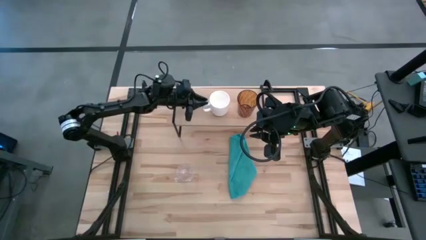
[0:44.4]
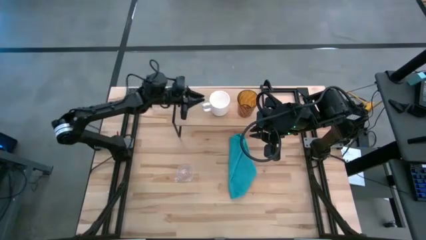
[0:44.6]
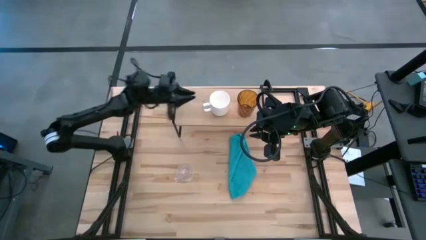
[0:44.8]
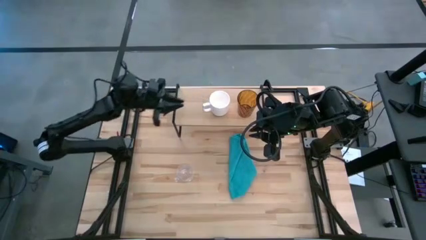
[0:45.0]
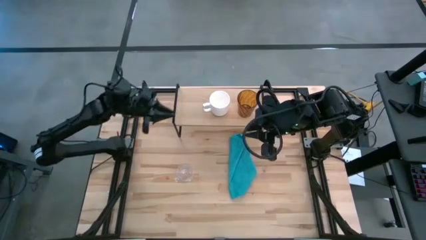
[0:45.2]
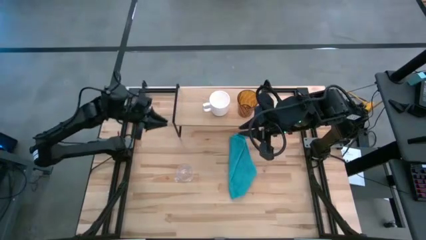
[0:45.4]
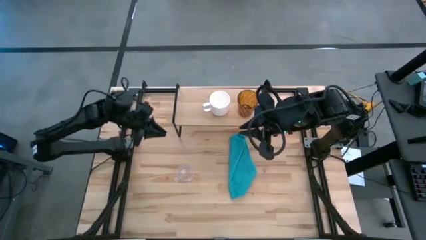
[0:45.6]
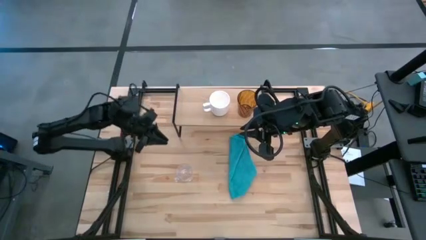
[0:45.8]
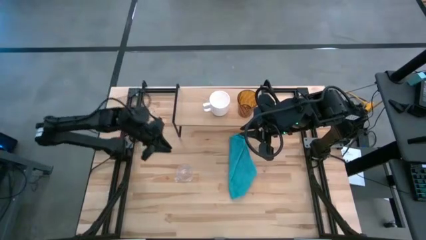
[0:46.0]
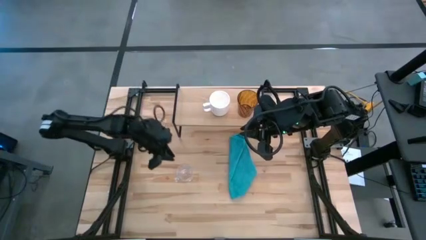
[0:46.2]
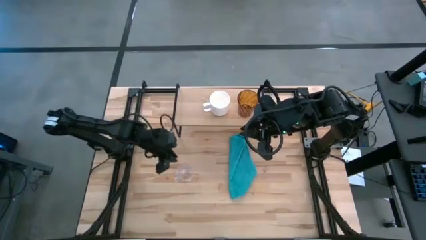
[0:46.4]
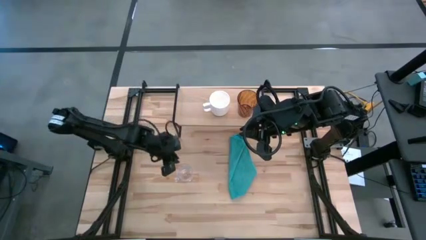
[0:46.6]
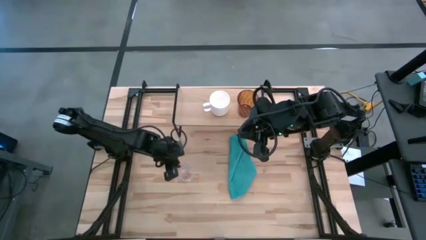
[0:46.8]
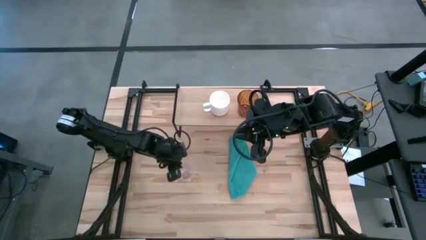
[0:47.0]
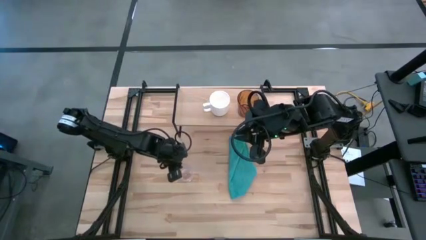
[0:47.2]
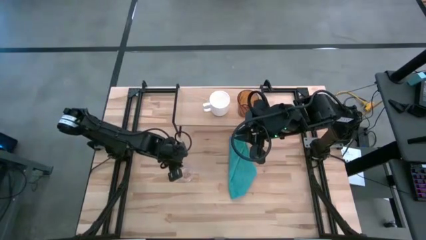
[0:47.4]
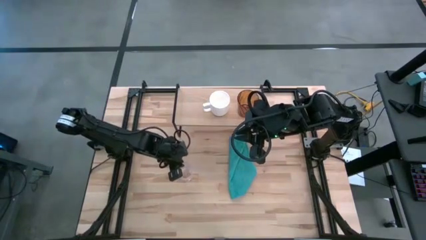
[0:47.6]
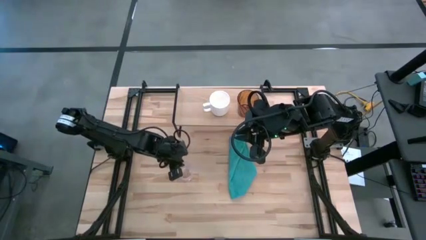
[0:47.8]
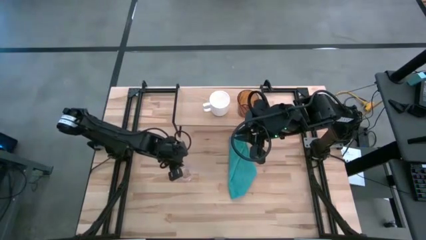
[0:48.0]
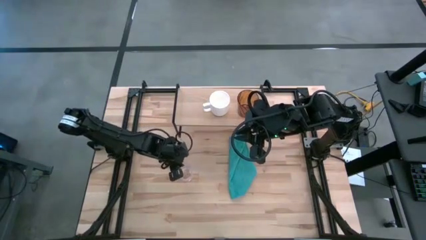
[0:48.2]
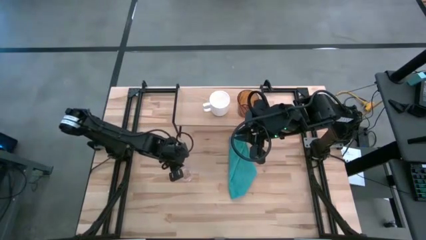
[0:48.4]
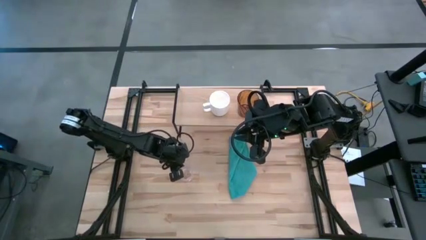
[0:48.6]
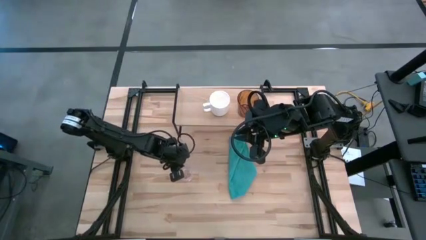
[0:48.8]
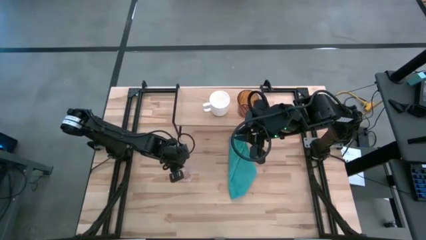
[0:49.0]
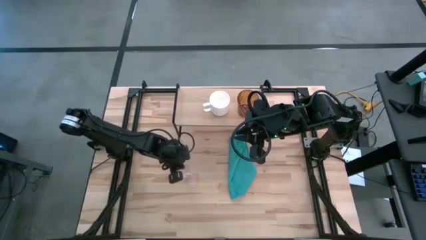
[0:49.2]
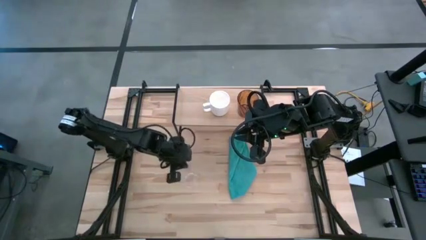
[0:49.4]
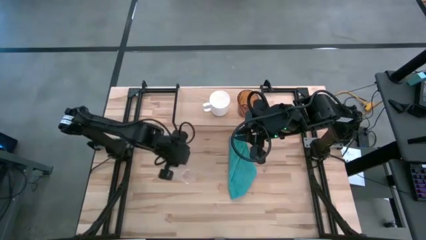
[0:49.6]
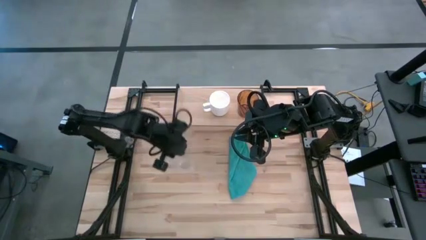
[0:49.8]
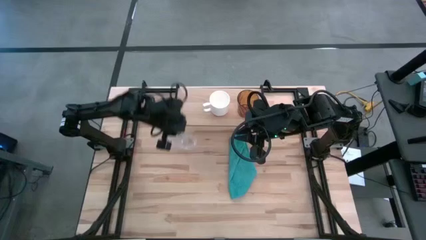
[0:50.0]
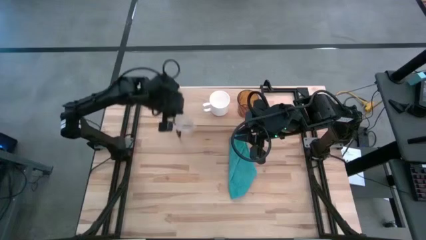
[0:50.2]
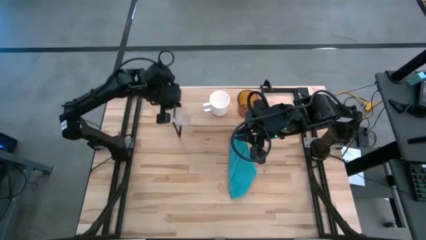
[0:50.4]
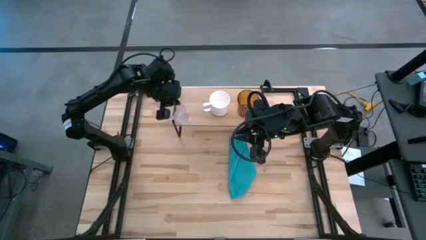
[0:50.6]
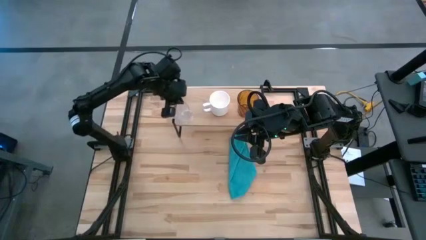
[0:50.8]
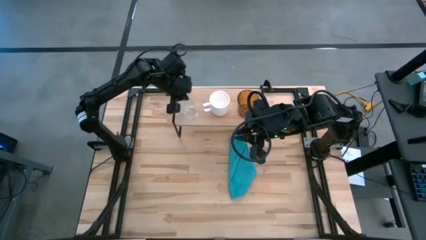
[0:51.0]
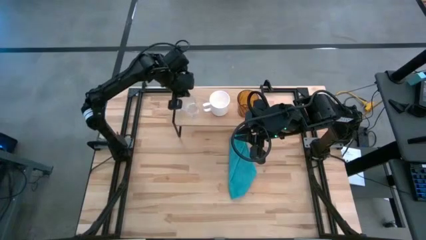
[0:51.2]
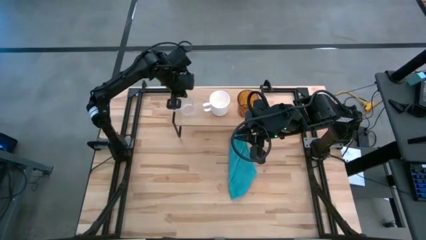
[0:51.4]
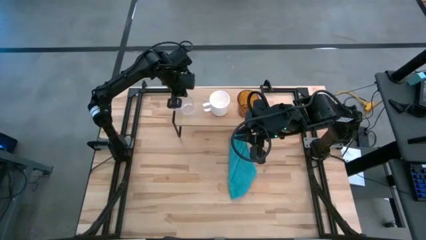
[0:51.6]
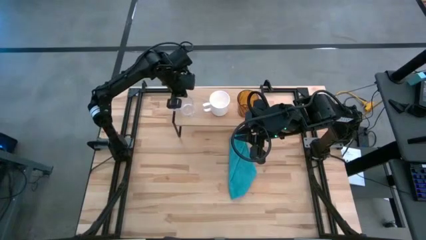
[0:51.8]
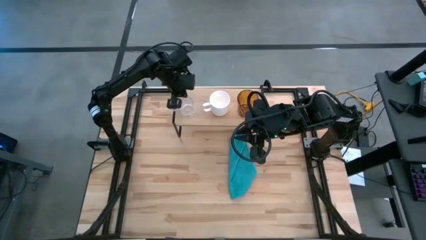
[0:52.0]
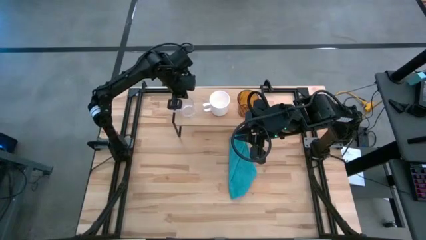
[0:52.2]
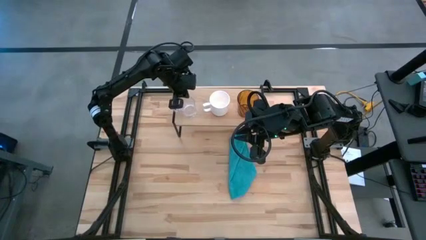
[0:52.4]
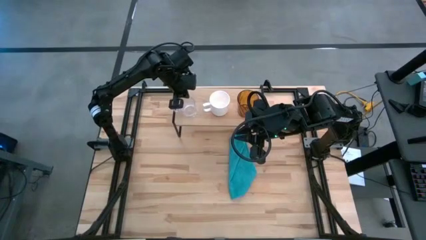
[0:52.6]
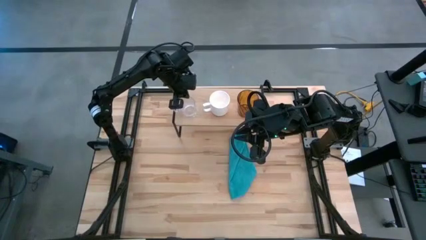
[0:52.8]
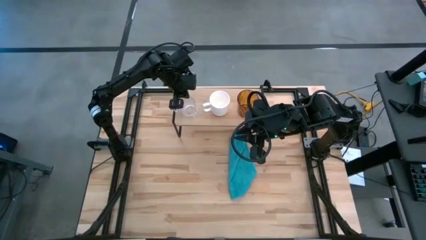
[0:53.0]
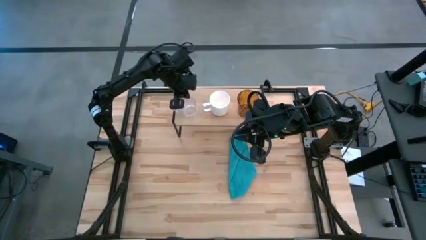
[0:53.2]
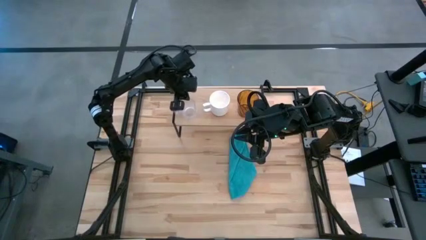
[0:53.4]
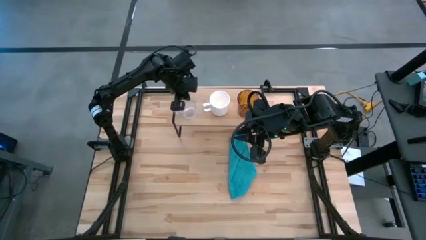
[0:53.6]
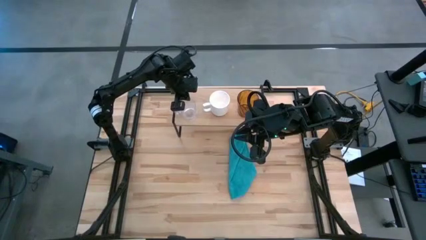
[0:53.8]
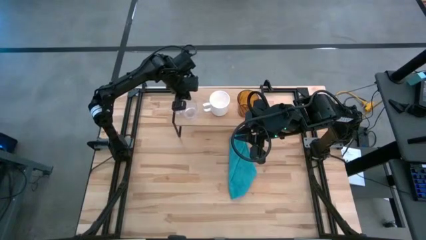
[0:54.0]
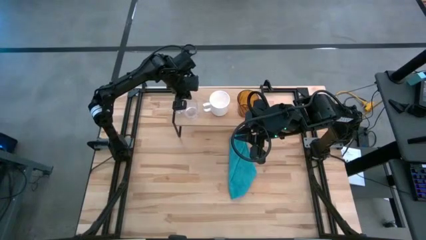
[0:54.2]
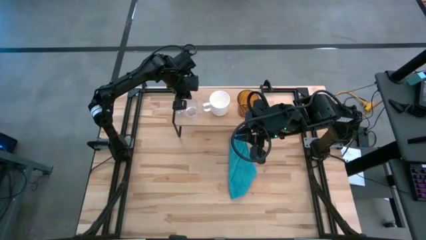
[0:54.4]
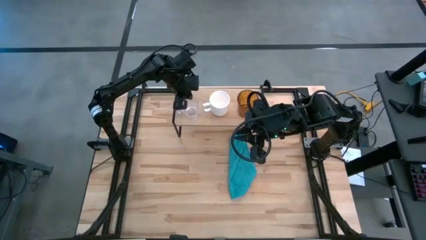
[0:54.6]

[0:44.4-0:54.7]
Task: Stack small to large cups/mugs on shelf
Put the transparent mug on the shelf

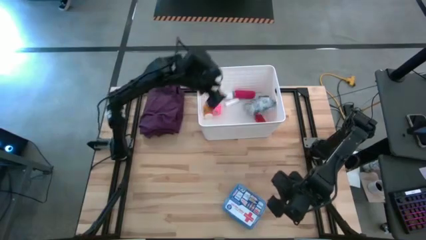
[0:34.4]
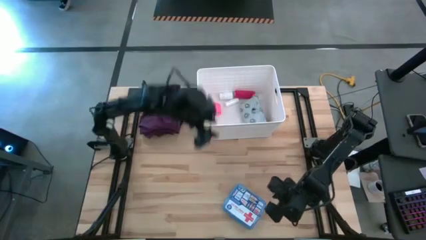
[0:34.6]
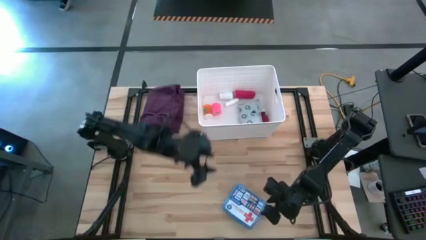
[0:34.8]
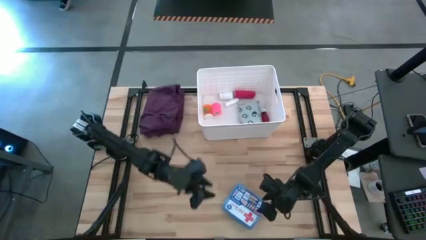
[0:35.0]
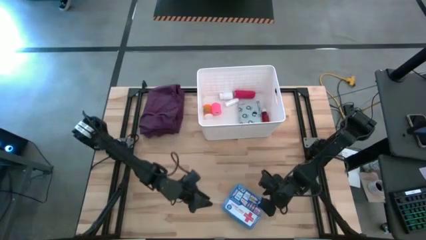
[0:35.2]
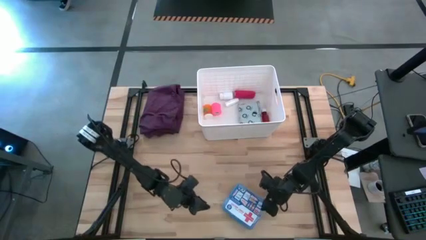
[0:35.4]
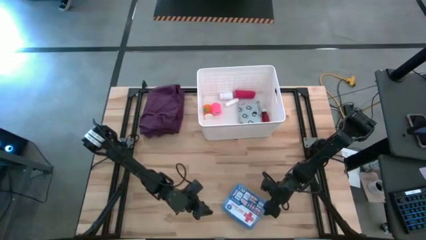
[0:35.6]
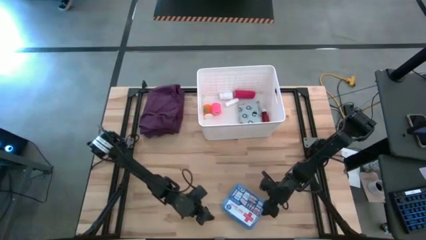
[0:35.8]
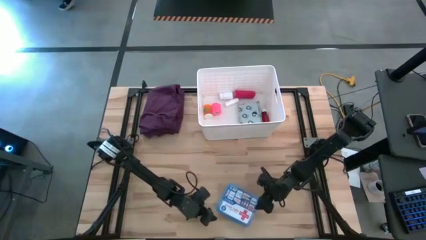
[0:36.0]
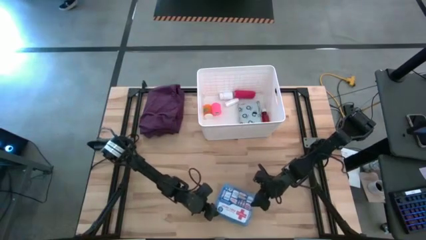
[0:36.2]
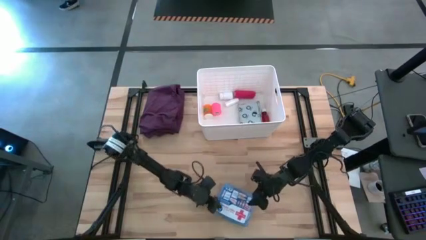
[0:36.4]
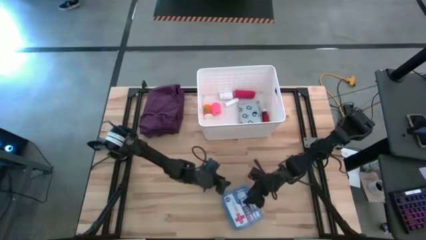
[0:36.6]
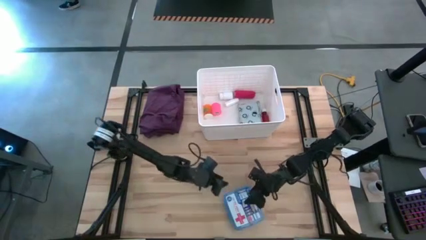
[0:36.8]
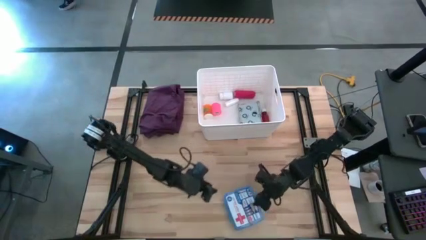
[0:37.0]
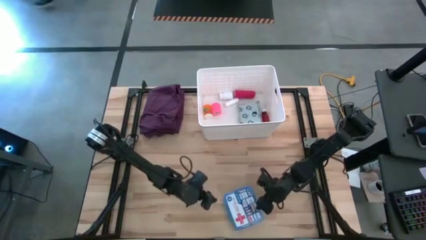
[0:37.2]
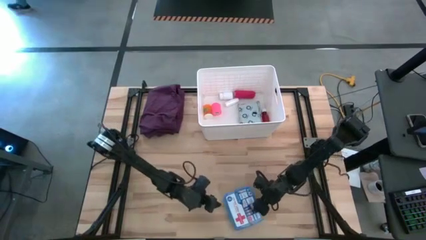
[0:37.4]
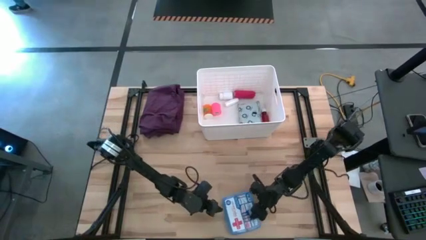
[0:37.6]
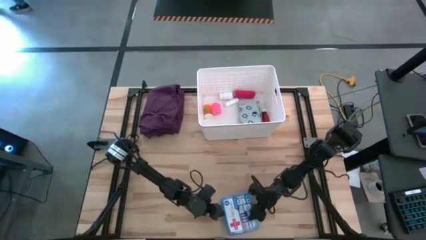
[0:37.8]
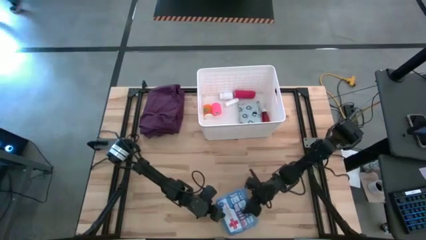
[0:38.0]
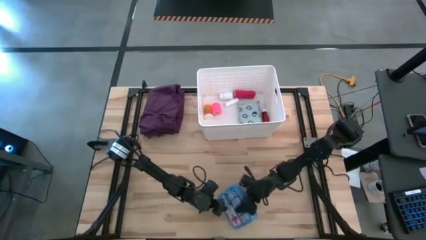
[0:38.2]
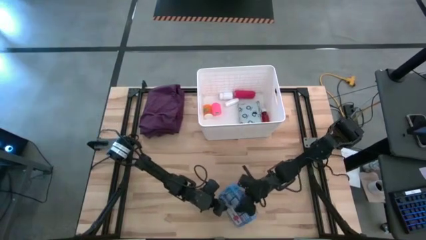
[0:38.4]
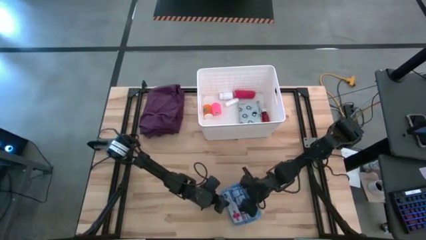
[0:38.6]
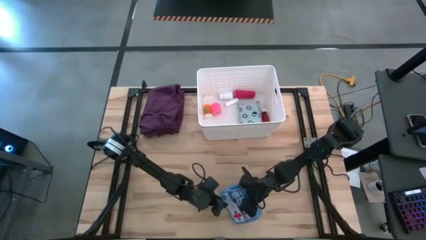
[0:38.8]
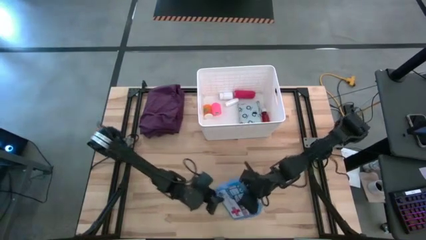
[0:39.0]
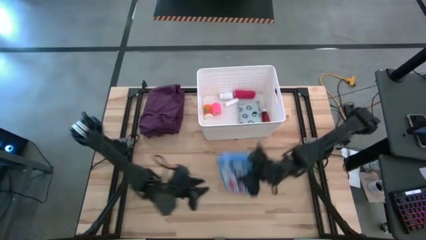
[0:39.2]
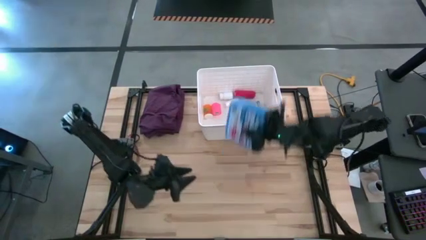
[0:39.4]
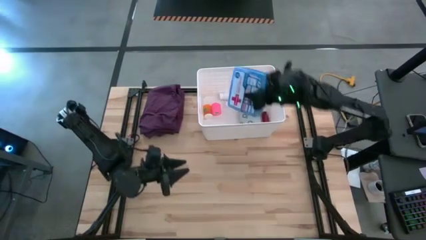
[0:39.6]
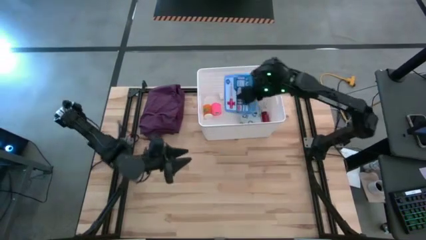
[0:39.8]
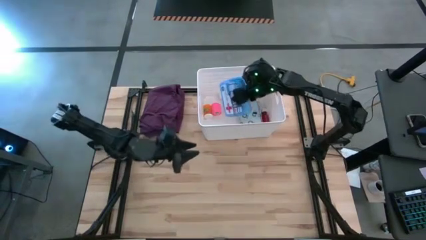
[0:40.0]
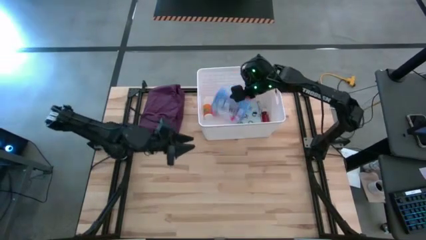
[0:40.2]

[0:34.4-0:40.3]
Task: Pick & place medical supplies in basket/bin
Put the first aid kit into the bin
